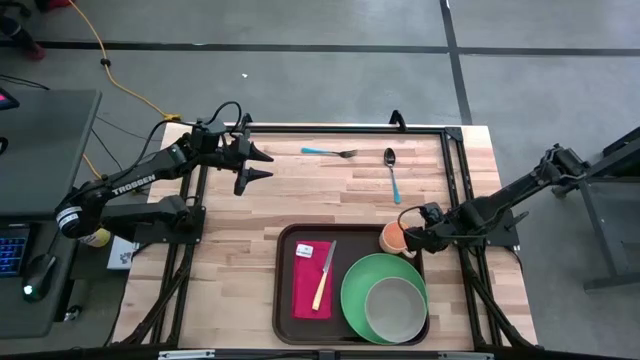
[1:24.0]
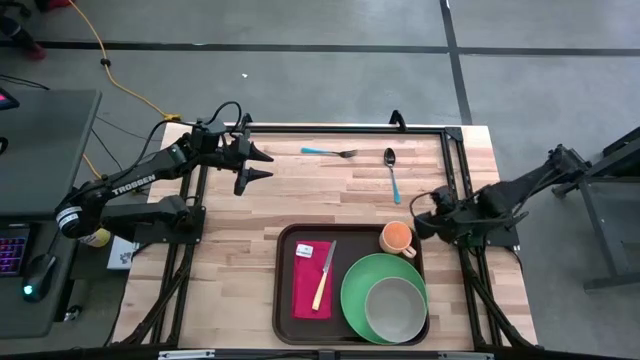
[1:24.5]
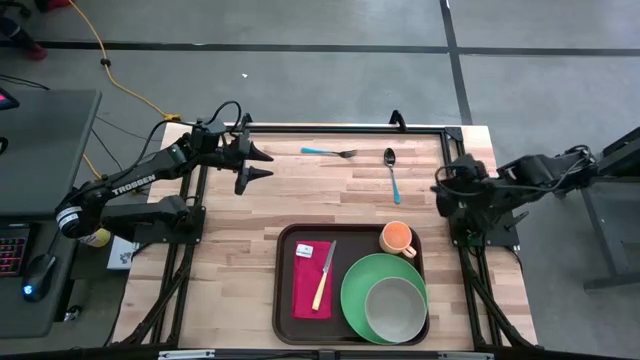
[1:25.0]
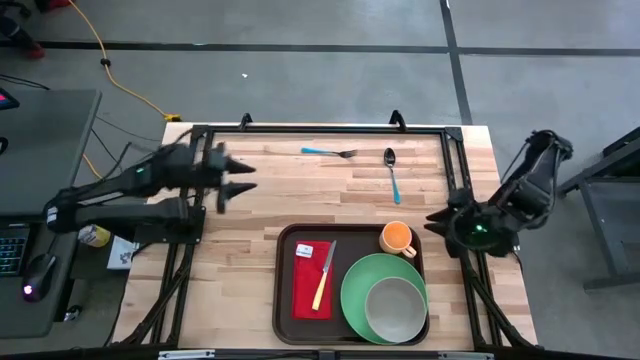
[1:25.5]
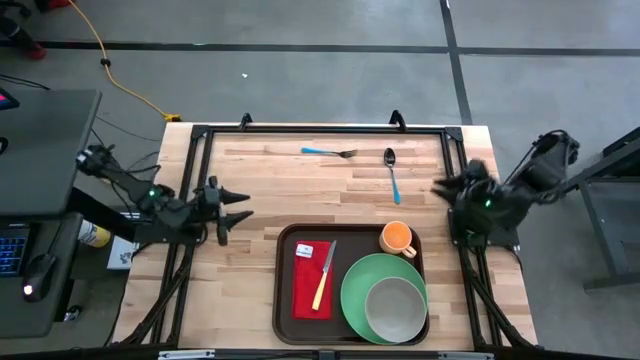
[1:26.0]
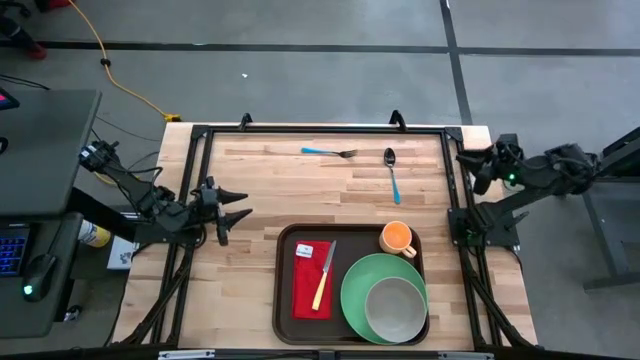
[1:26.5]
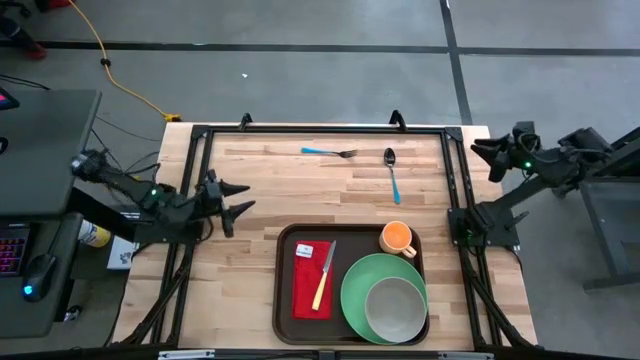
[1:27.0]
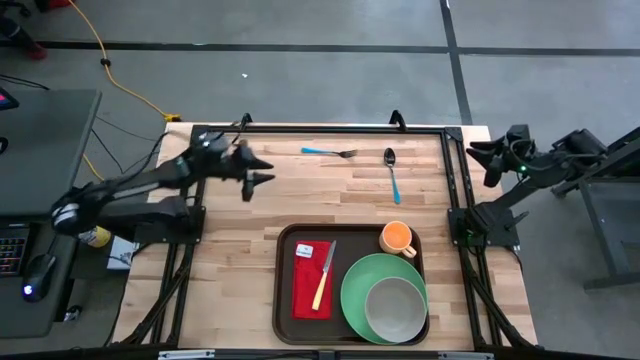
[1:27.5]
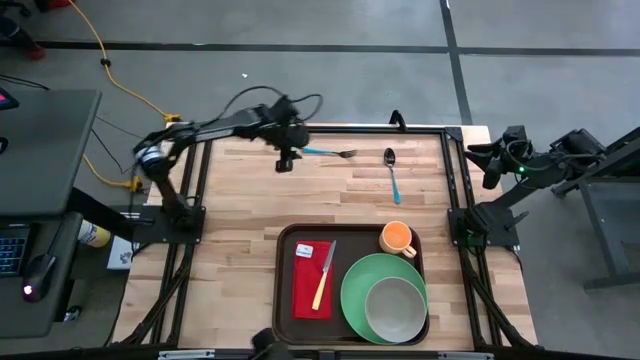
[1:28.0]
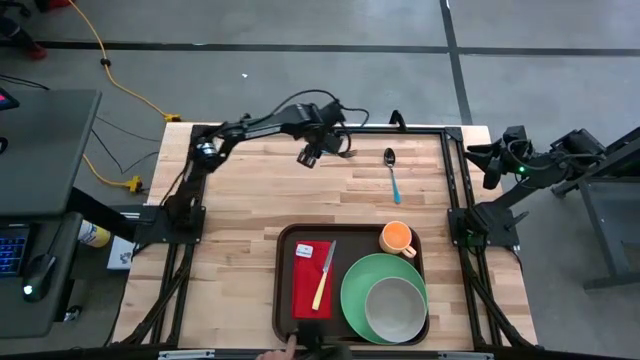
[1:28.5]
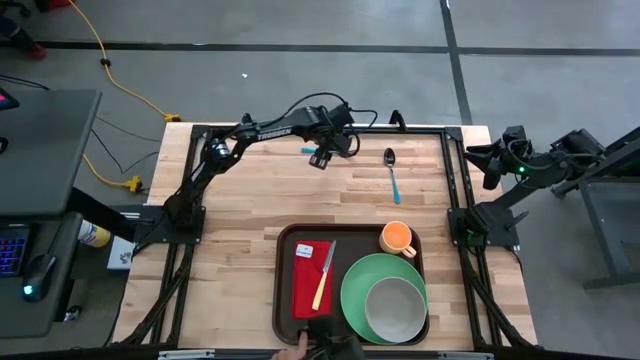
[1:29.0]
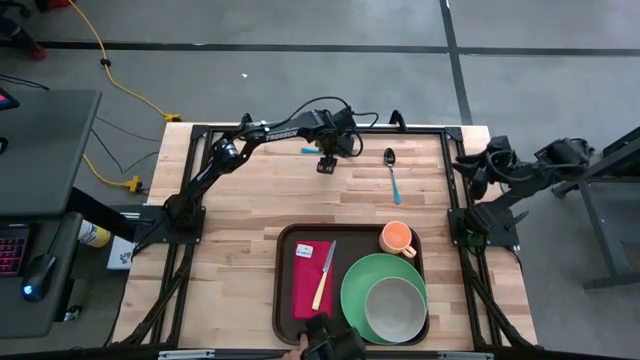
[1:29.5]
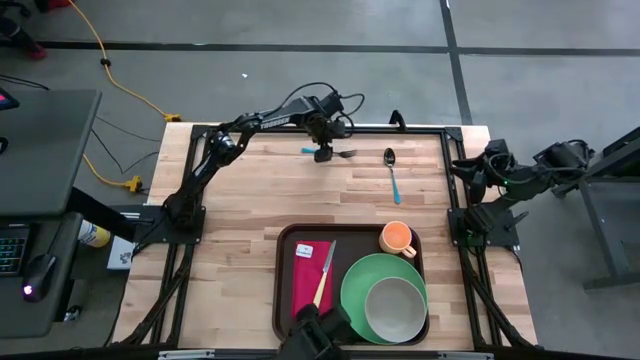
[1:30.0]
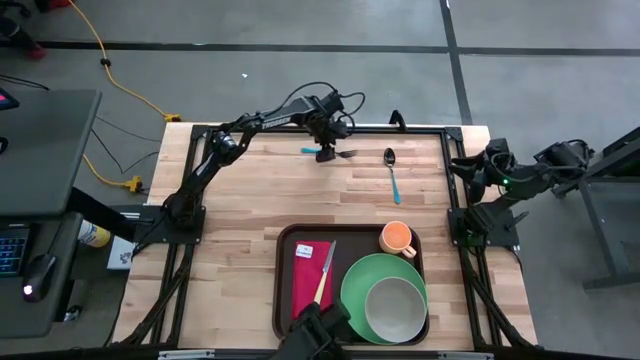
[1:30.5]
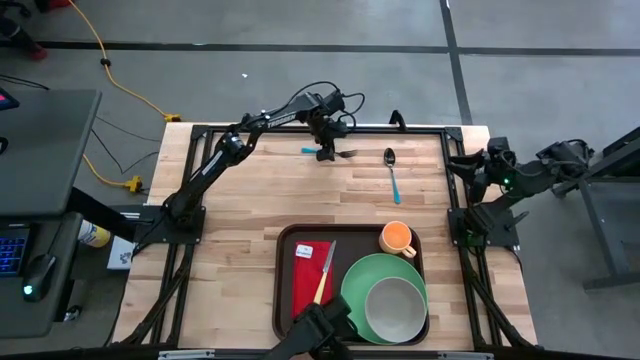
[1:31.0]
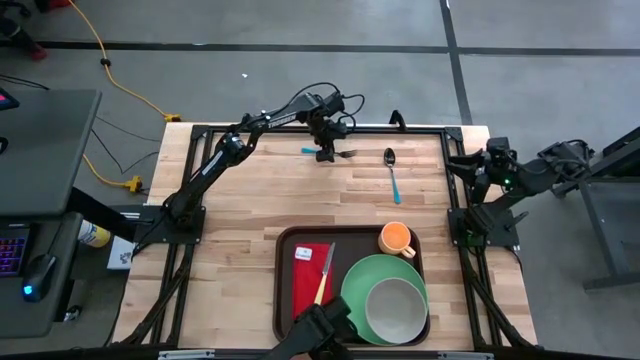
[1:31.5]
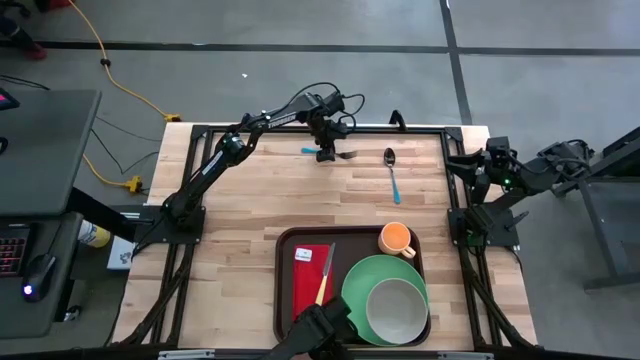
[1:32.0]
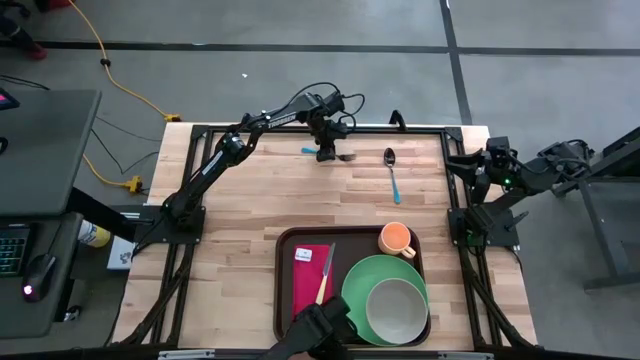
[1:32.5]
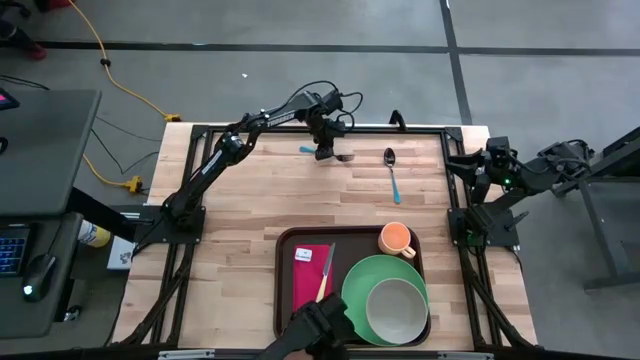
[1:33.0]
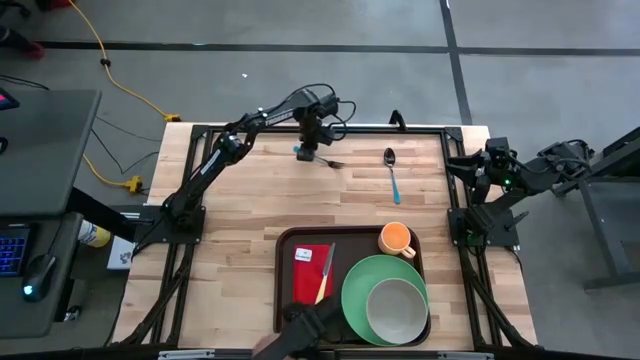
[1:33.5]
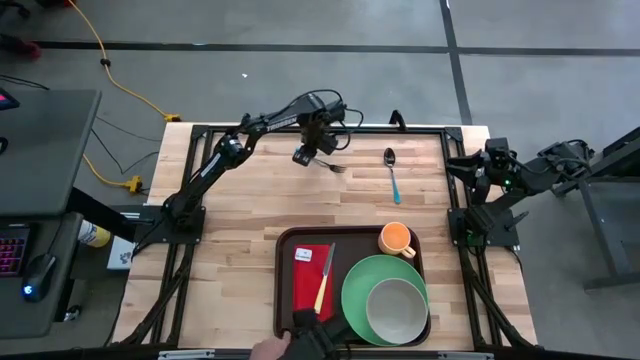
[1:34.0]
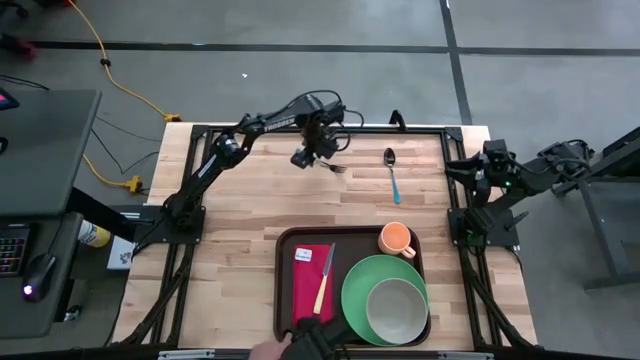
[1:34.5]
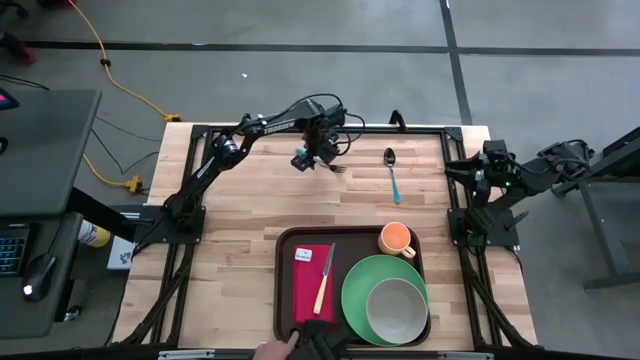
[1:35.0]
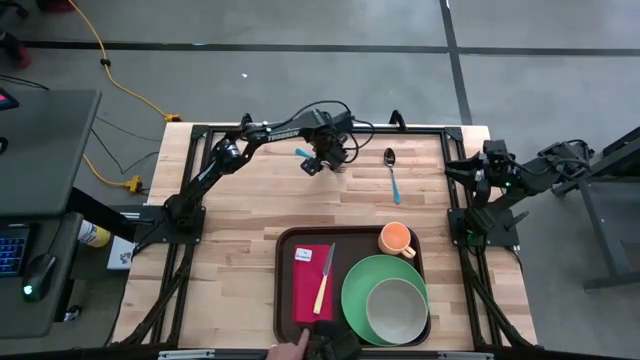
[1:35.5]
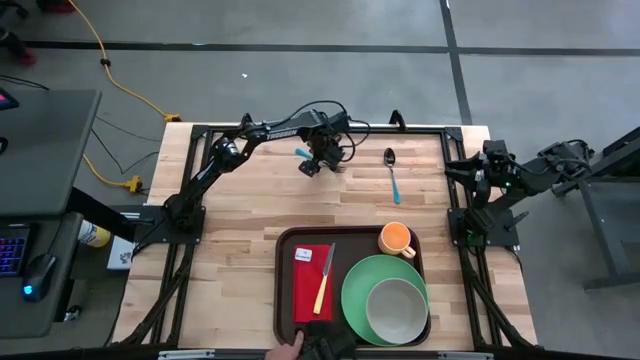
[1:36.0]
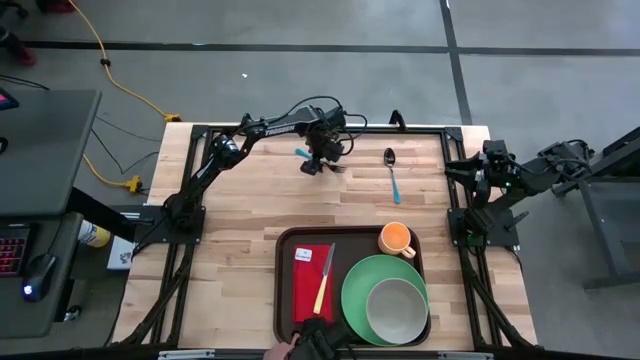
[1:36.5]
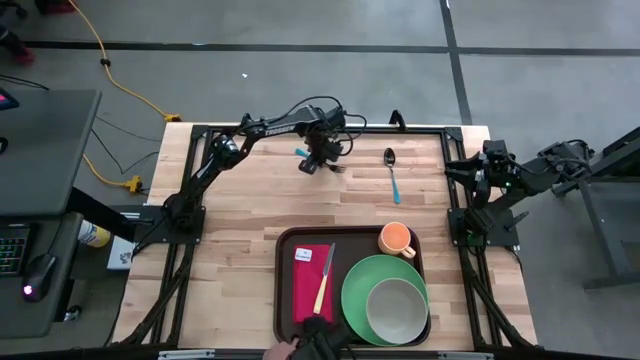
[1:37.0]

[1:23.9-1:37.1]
Task: Set up tray
Put the blue fork on the top of red cloth table napkin

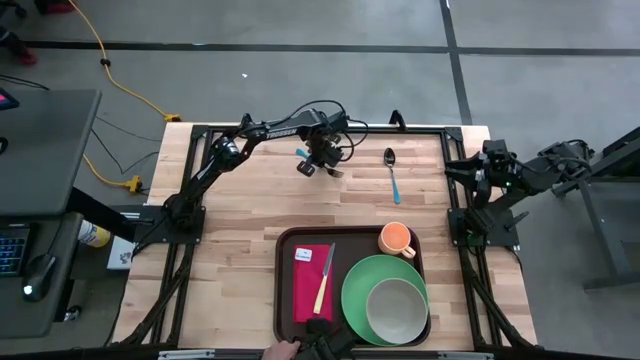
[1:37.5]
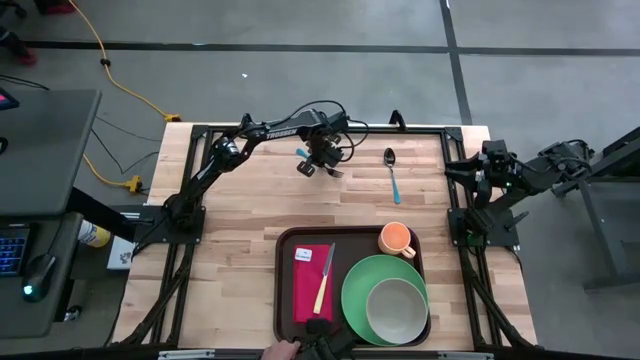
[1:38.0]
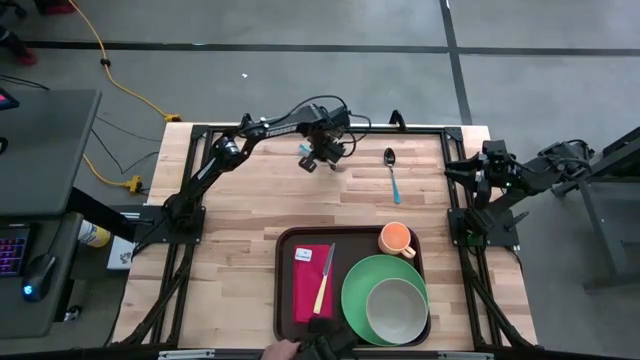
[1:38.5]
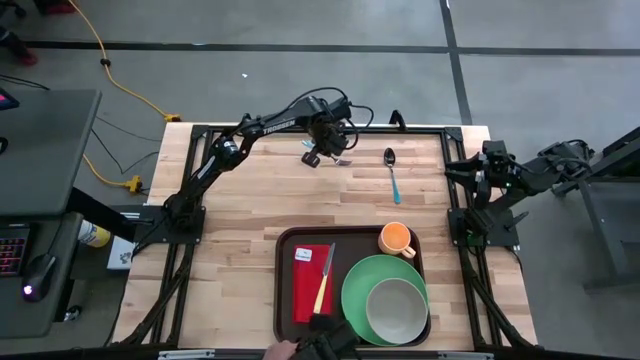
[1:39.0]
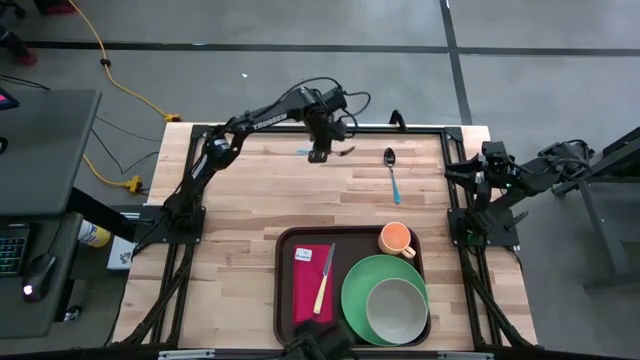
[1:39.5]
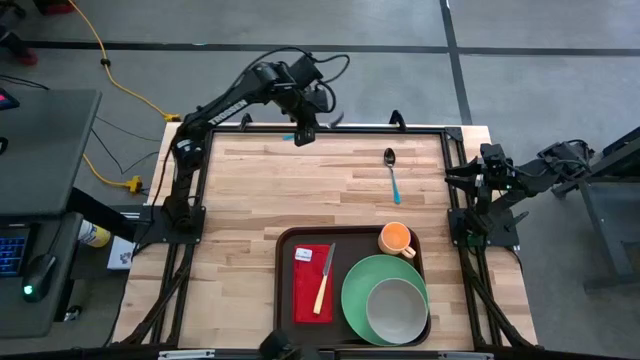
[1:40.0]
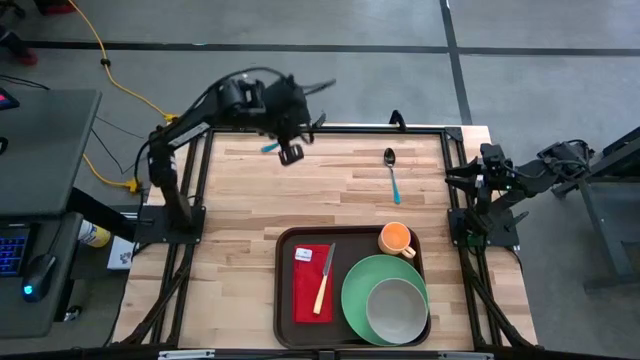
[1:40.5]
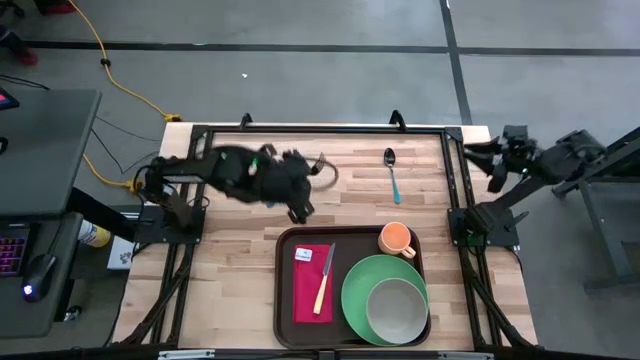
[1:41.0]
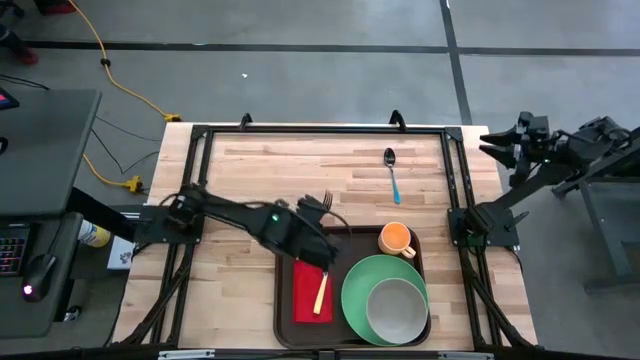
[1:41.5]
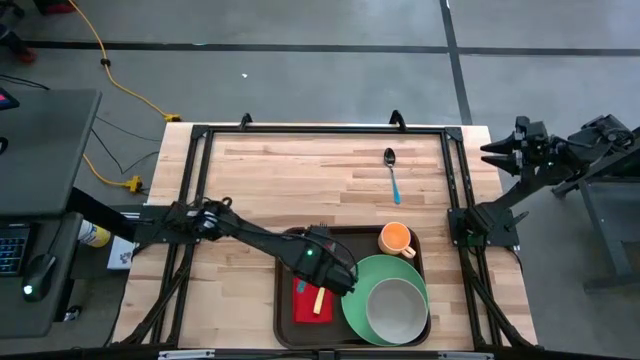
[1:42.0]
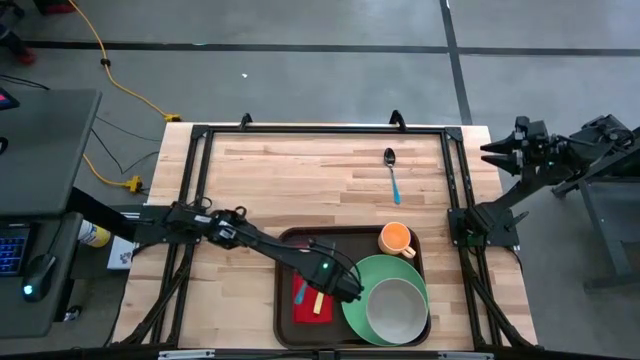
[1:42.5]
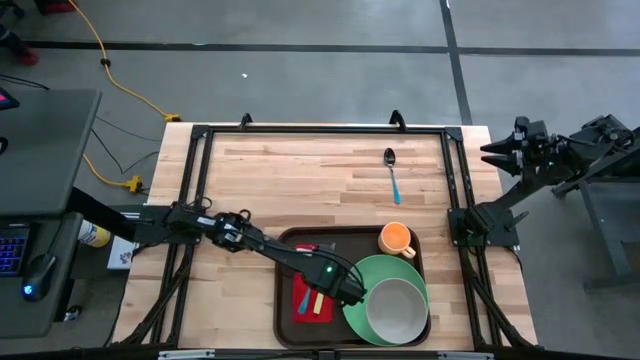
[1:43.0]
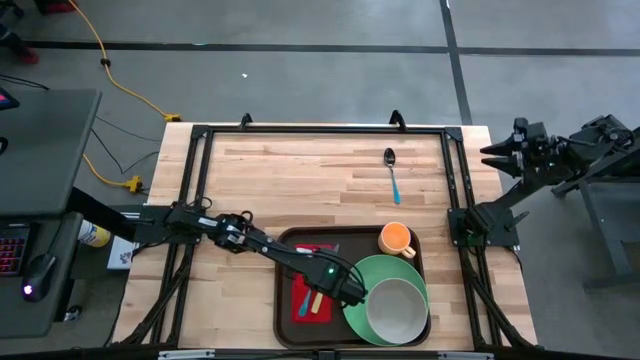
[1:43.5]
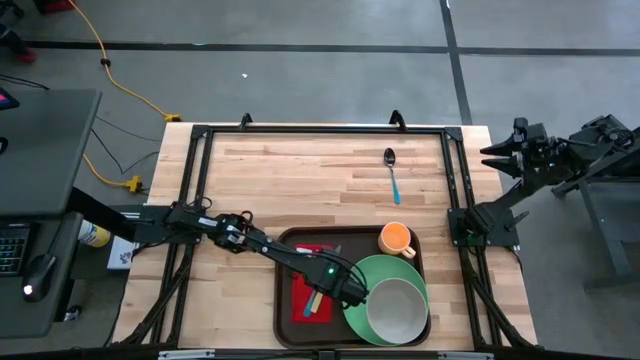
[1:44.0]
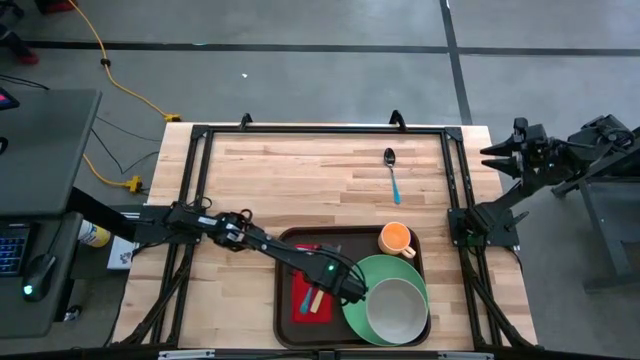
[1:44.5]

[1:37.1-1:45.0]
Put the blue fork on the top of red cloth table napkin
